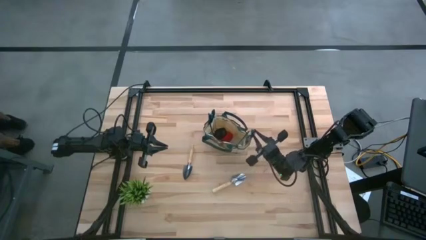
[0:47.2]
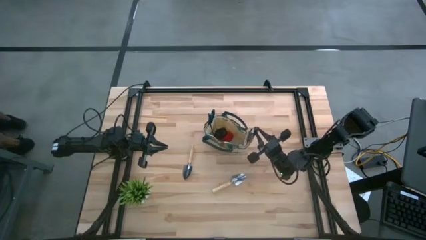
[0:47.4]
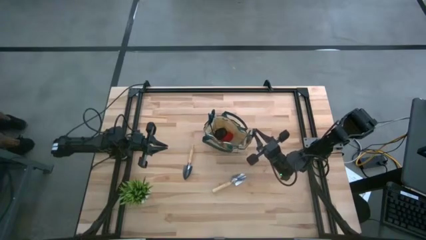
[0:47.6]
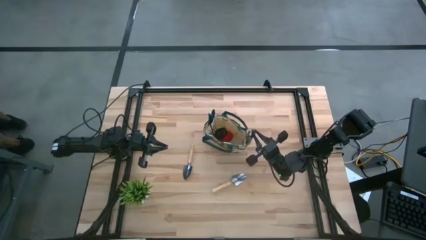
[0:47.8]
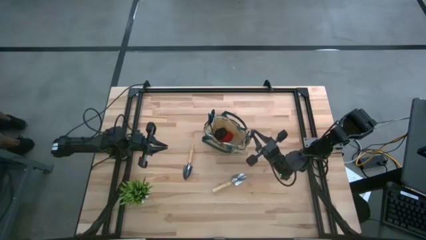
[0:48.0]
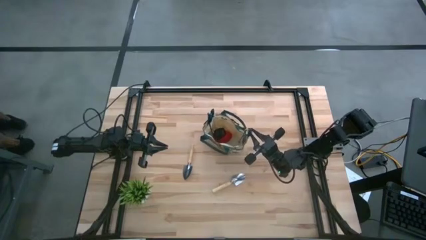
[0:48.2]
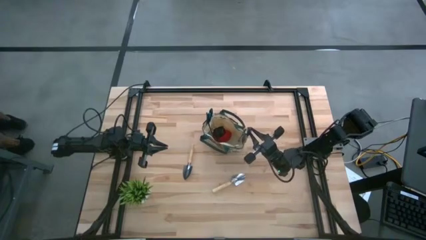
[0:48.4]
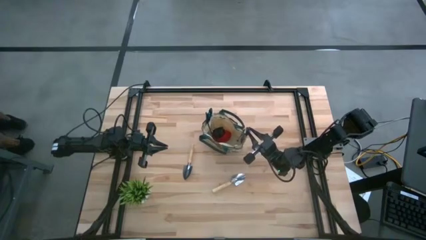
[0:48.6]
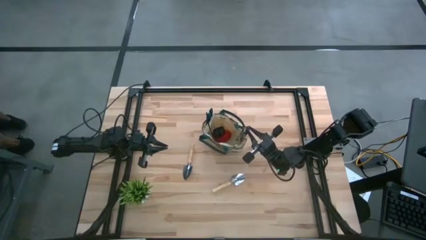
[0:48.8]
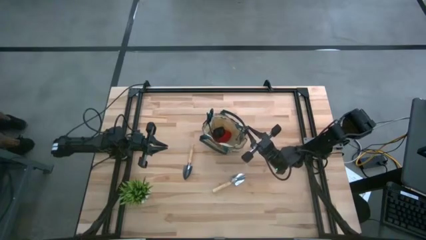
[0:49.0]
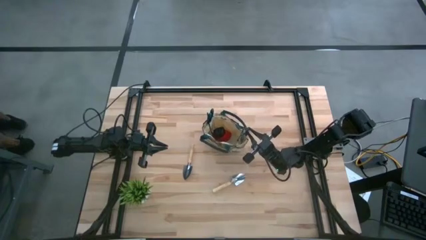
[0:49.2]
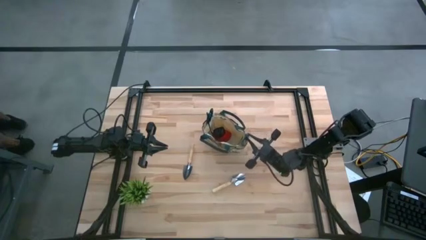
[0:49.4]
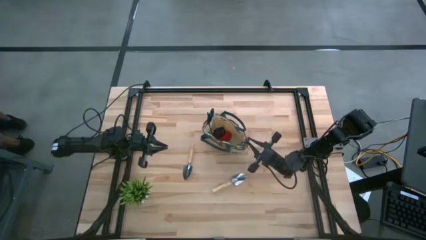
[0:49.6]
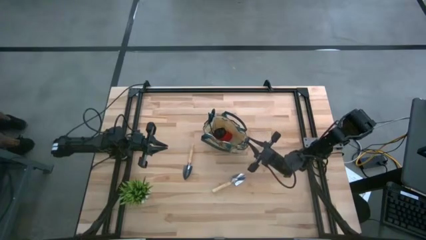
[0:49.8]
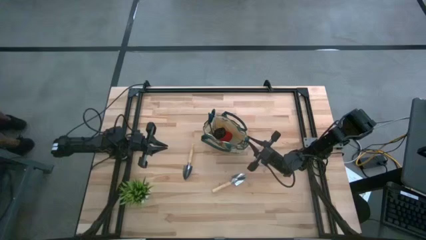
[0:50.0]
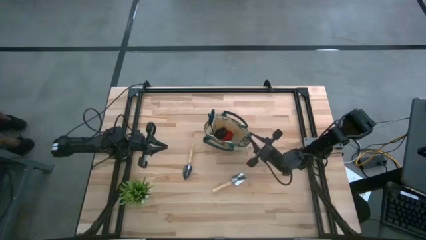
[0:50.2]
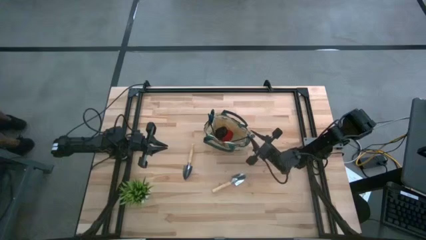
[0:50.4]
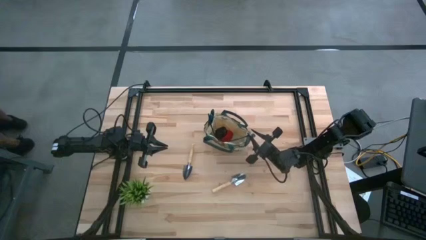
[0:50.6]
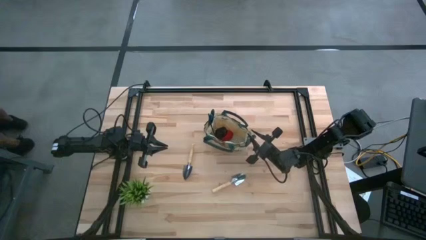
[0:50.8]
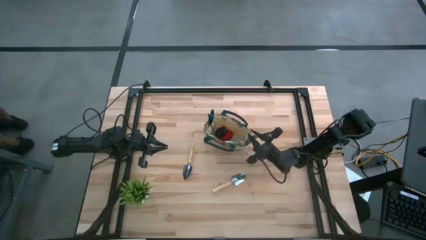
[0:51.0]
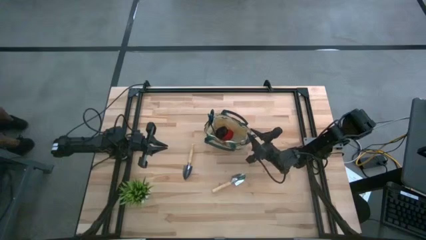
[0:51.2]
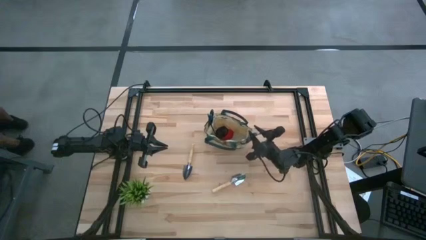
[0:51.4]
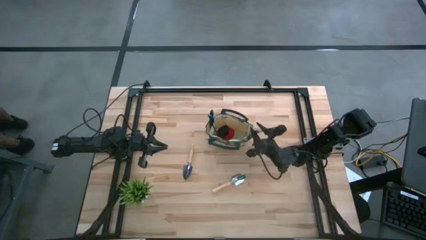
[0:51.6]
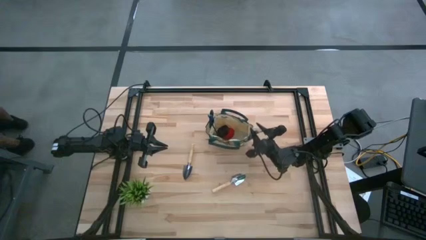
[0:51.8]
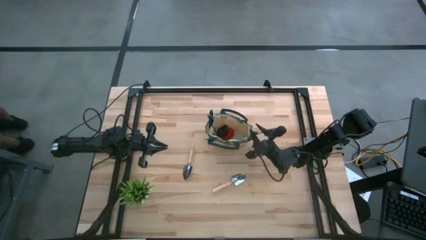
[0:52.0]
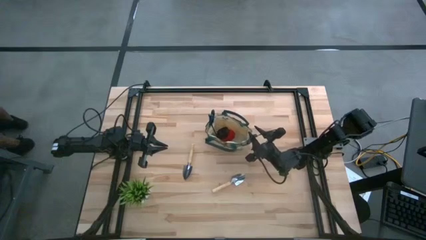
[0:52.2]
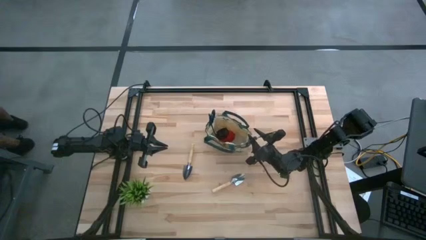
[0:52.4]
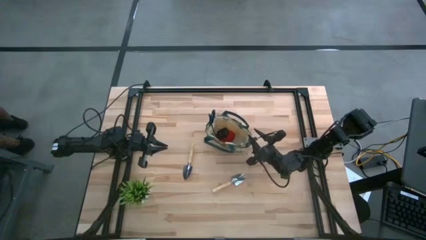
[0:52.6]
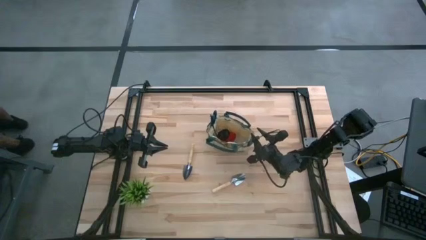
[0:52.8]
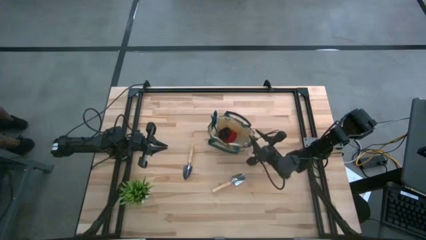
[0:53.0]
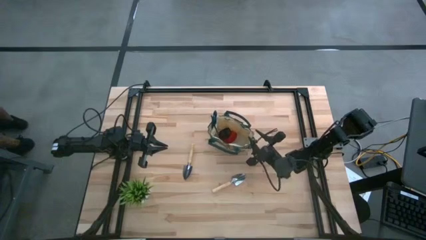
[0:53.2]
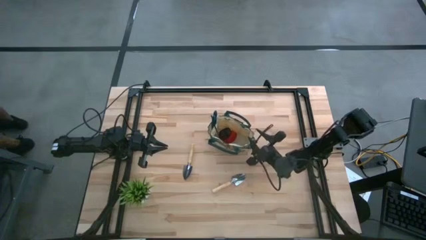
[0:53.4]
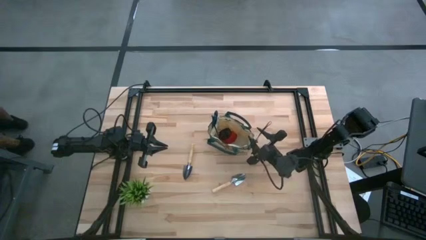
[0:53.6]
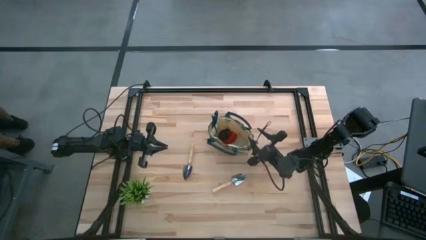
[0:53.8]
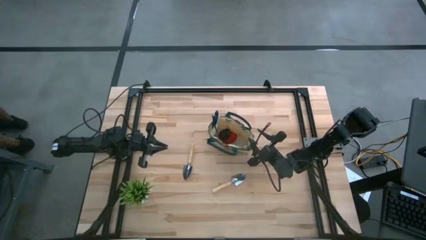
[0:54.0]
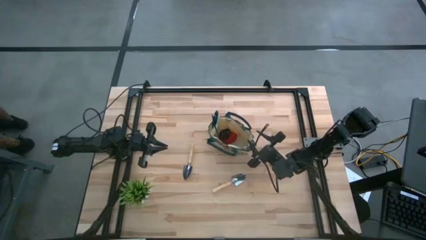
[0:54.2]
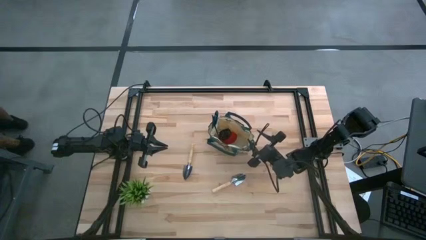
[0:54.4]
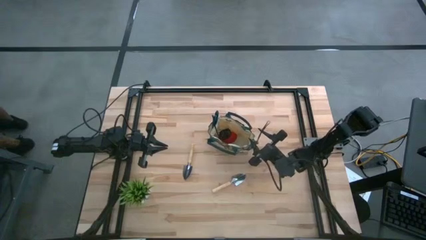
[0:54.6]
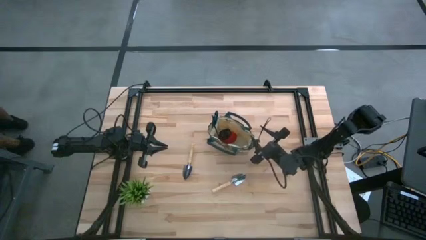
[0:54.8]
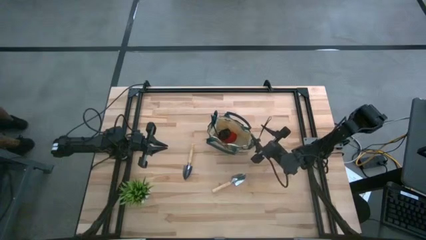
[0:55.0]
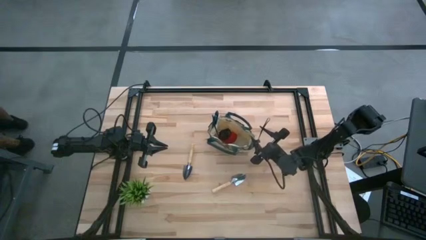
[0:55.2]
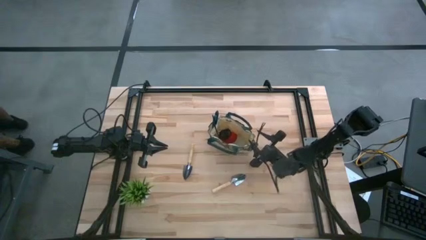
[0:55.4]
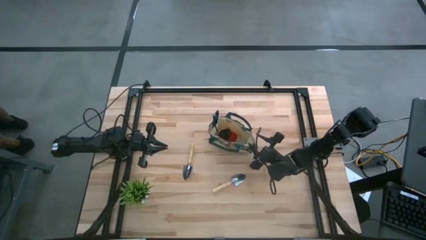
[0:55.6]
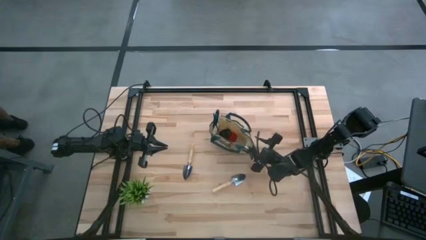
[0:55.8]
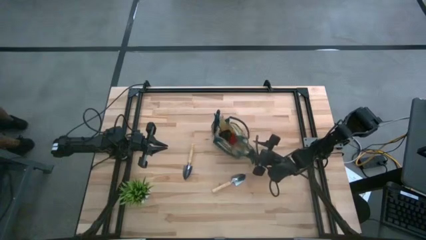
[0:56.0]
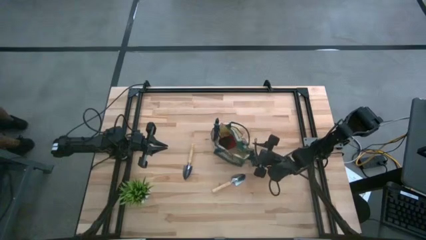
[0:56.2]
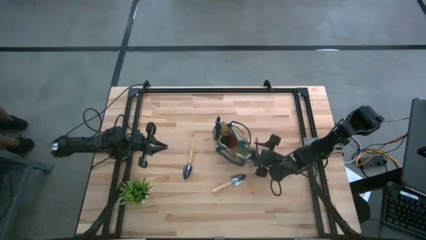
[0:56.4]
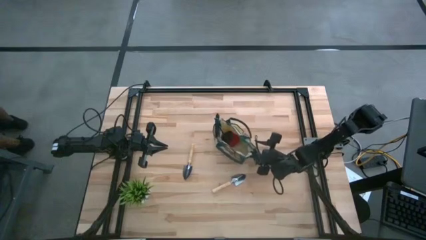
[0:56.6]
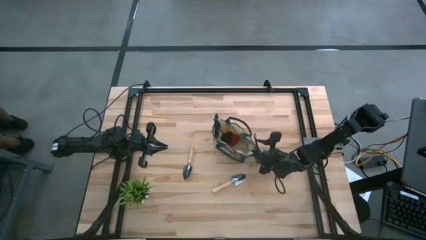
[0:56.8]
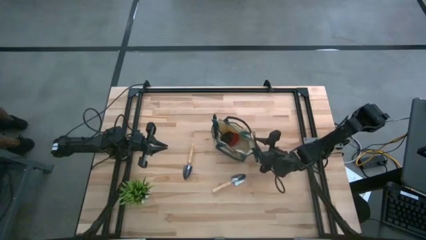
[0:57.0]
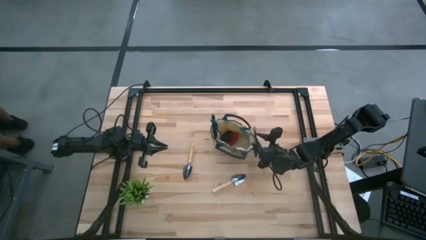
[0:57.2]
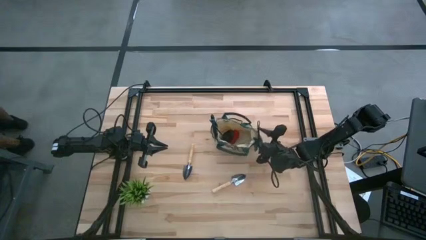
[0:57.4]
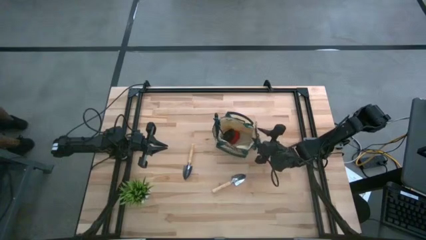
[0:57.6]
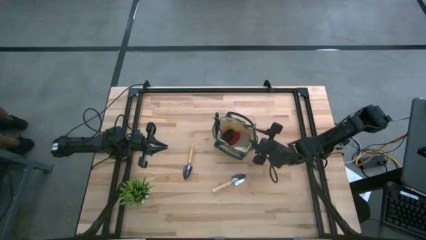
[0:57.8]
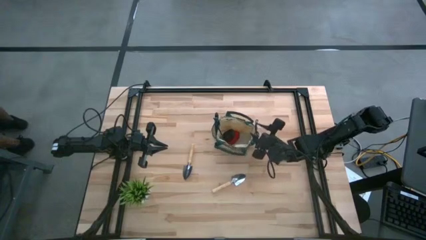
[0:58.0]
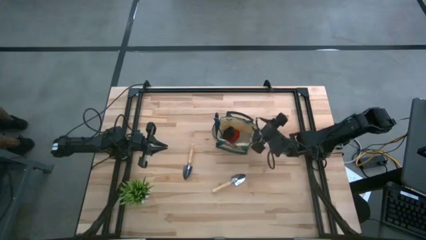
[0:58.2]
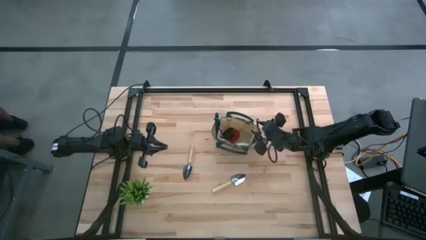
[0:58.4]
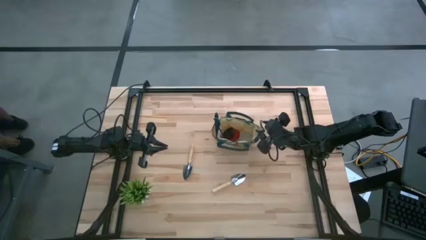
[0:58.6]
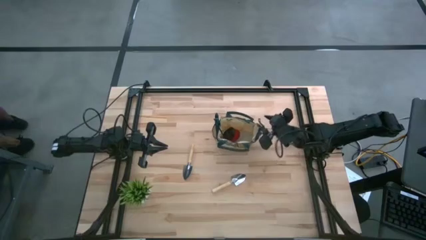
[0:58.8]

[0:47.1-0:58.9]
Task: Pick & Place Garden tools in Gardening bag
Put the shear scissors into the gardening bag

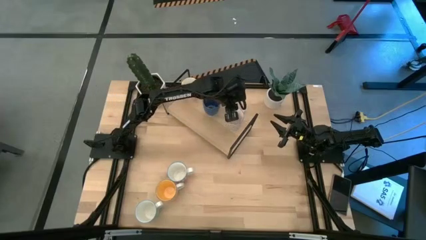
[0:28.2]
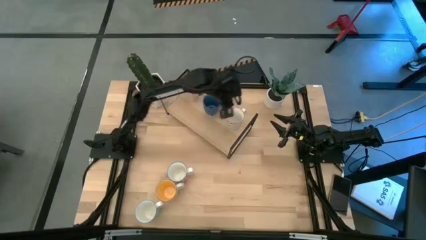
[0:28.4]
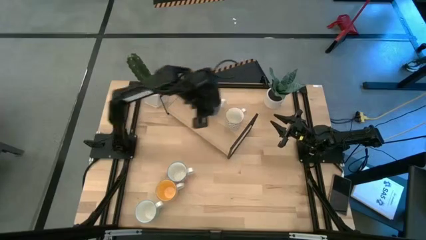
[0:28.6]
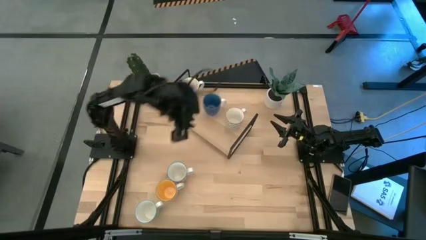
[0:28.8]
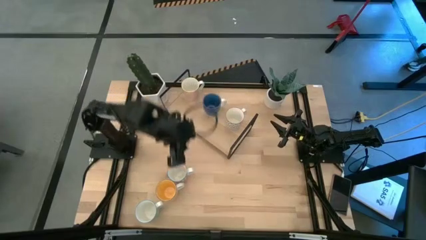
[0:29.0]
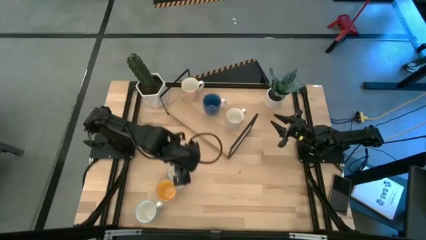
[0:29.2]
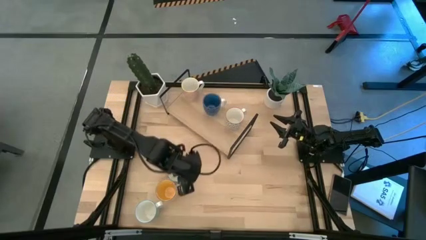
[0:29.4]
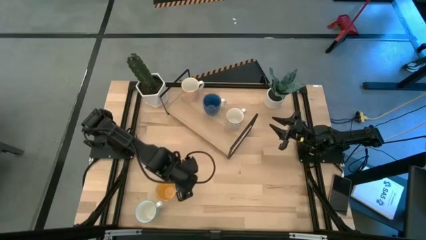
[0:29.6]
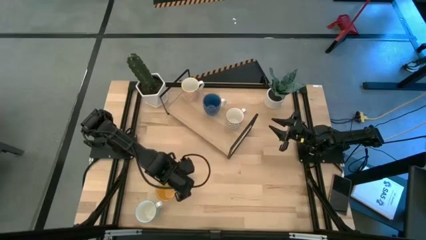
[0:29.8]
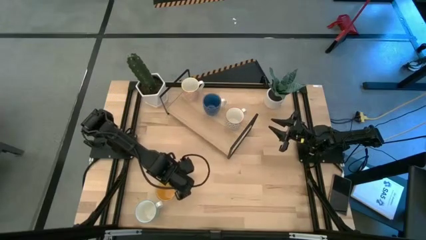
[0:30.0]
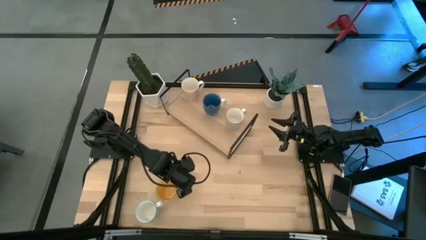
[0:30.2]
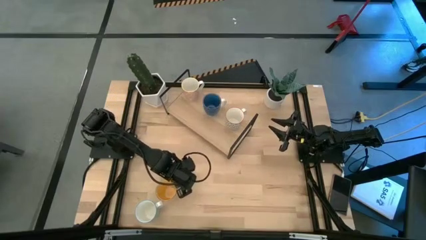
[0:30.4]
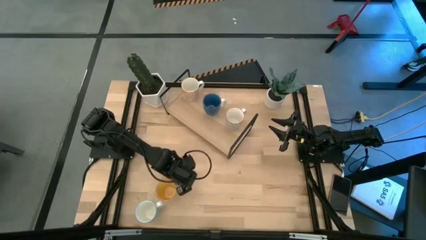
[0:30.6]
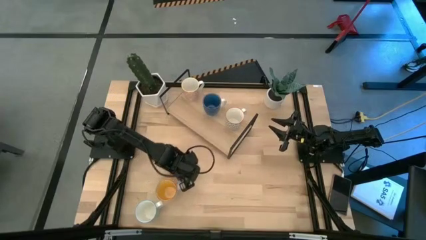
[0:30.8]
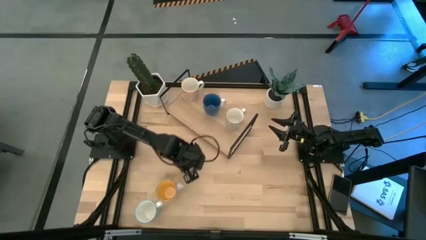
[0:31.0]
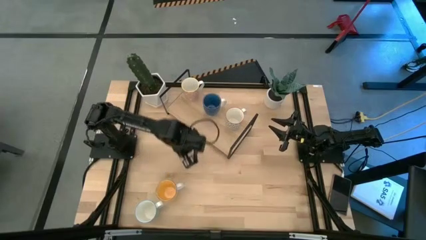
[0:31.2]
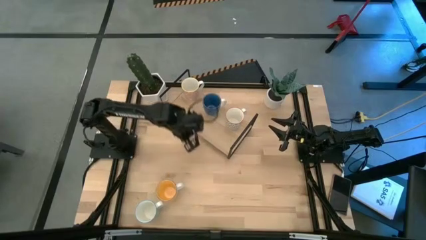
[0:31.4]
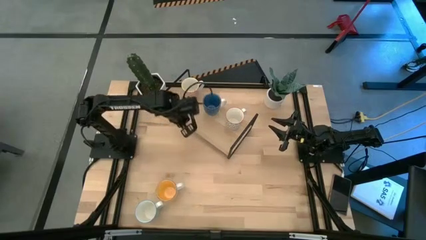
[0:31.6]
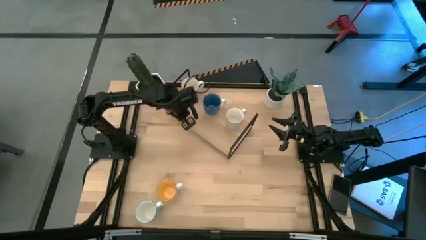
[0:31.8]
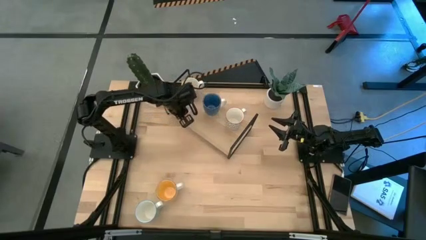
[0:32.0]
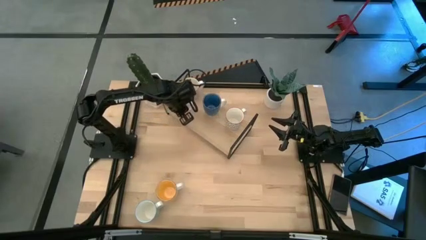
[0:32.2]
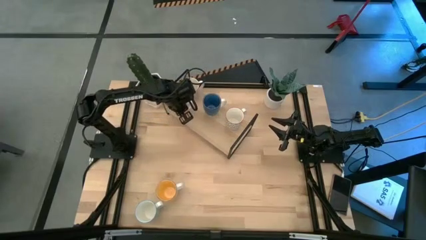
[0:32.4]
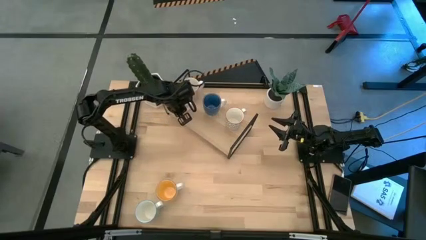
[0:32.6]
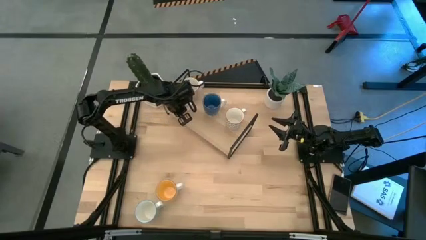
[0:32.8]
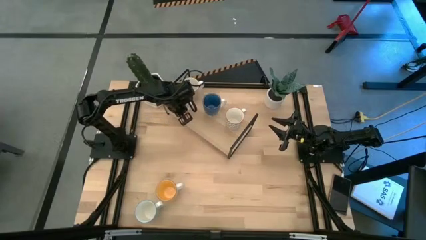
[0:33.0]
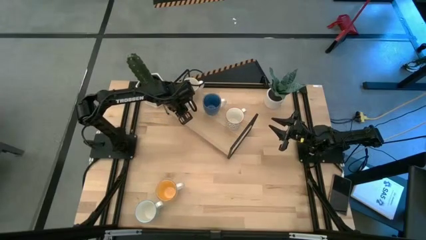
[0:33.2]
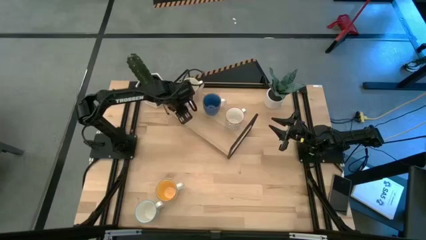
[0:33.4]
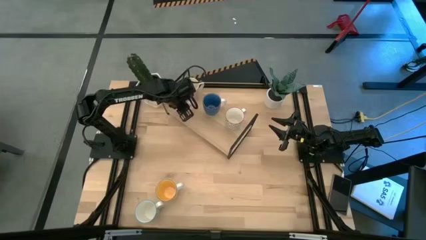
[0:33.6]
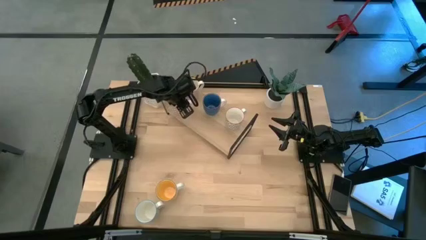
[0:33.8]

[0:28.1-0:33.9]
Task: Place coffee mugs
Put the red patterned mug on the shelf
